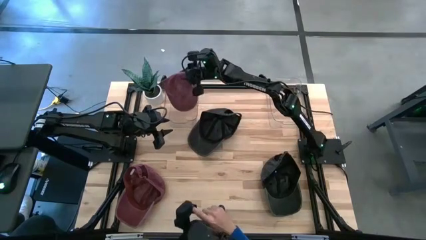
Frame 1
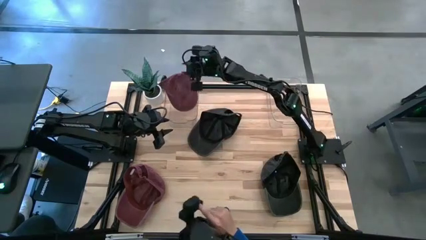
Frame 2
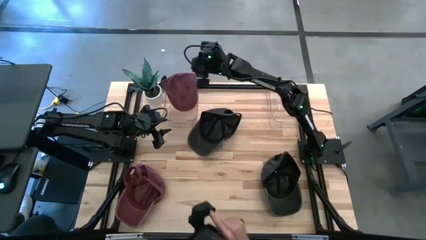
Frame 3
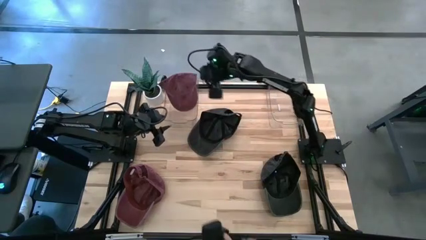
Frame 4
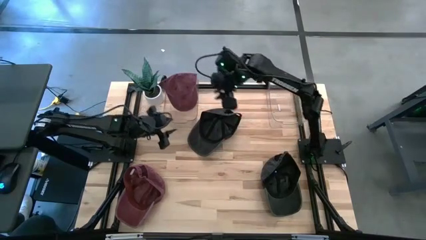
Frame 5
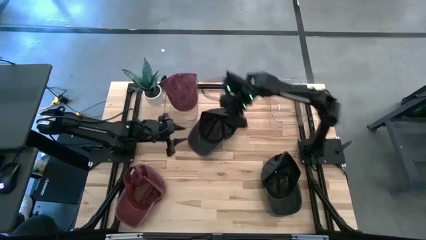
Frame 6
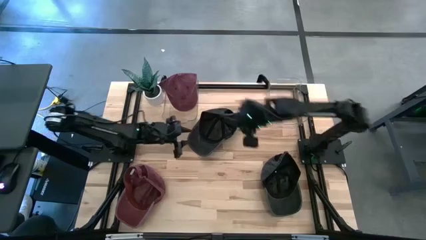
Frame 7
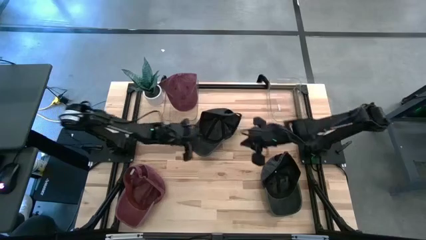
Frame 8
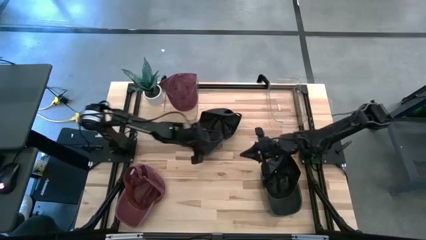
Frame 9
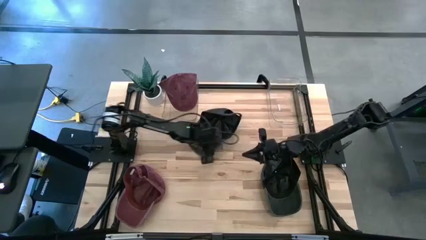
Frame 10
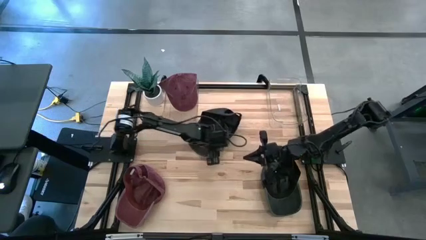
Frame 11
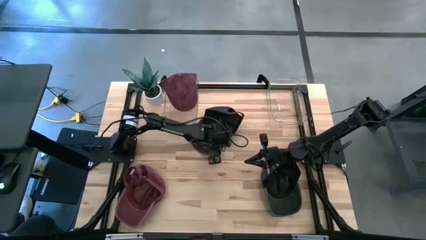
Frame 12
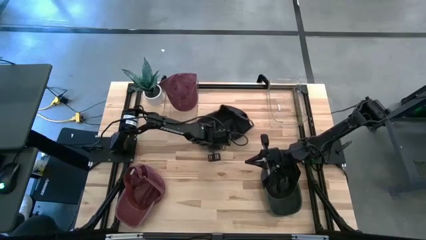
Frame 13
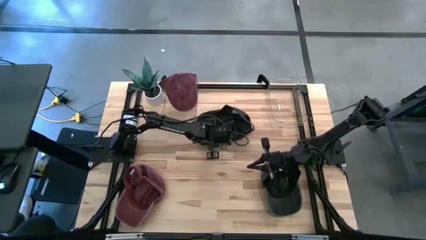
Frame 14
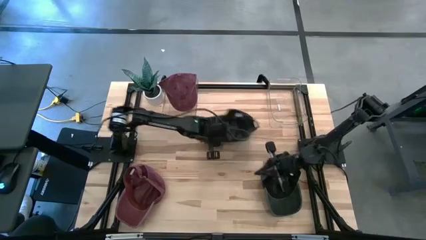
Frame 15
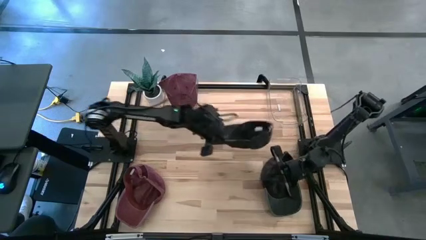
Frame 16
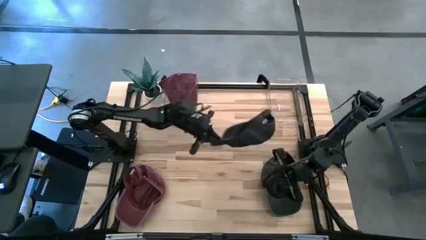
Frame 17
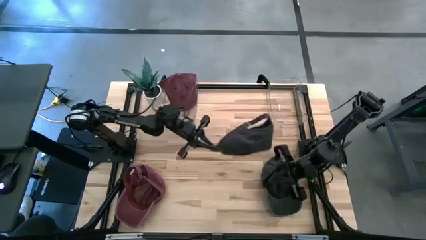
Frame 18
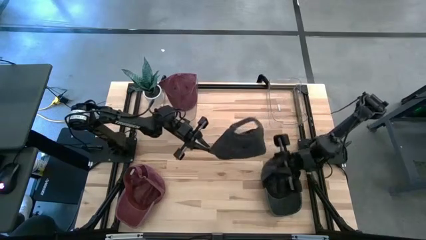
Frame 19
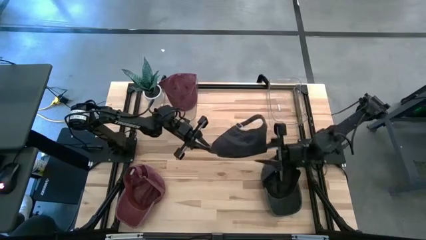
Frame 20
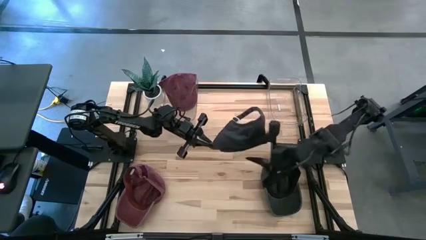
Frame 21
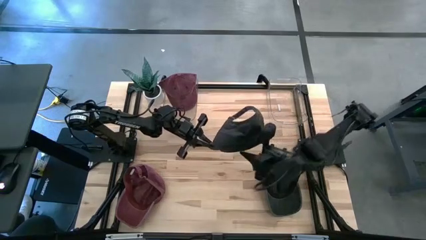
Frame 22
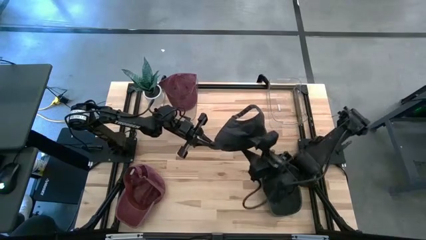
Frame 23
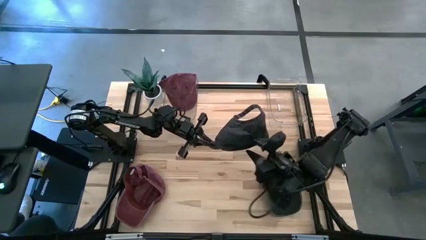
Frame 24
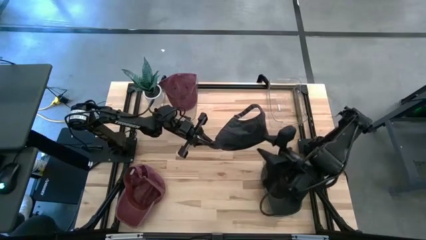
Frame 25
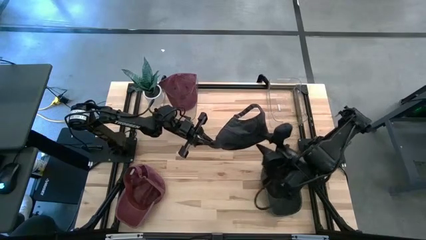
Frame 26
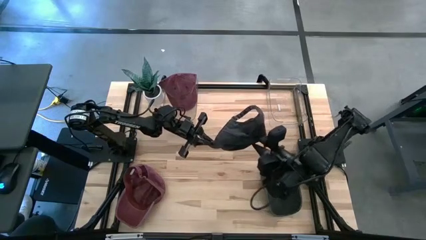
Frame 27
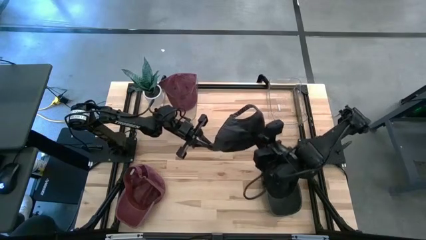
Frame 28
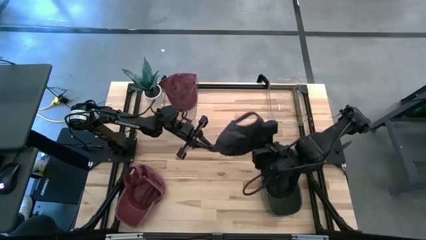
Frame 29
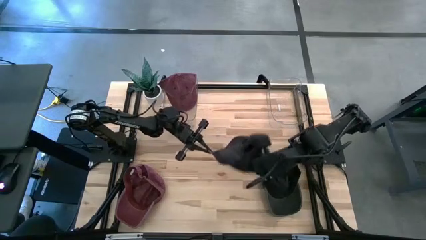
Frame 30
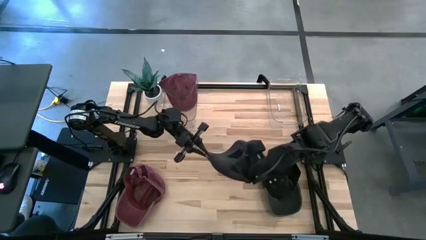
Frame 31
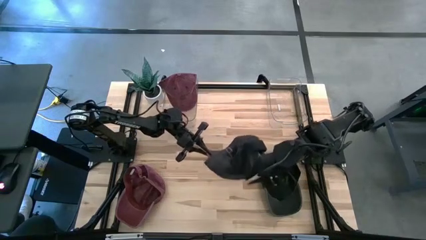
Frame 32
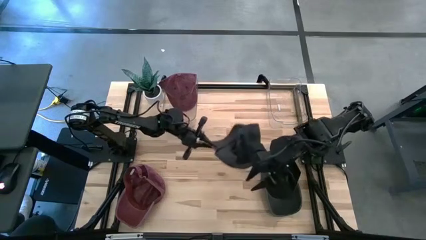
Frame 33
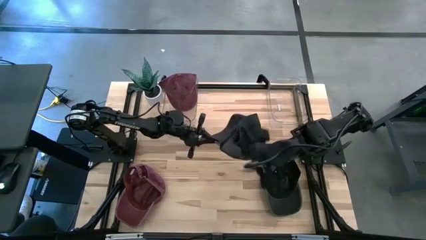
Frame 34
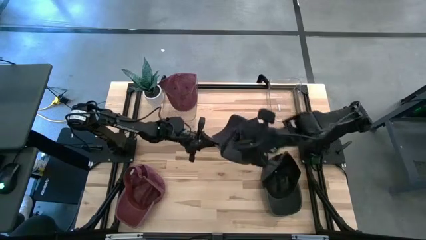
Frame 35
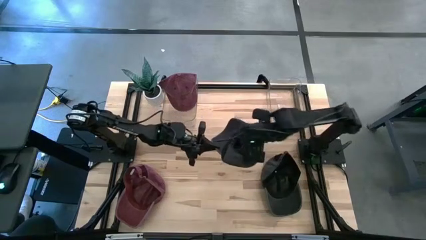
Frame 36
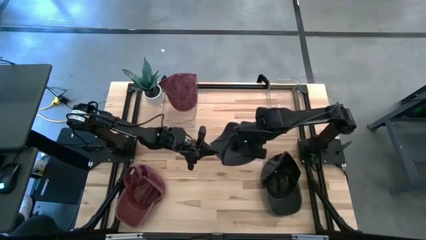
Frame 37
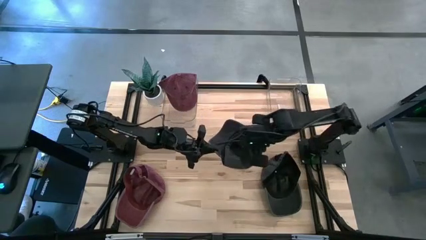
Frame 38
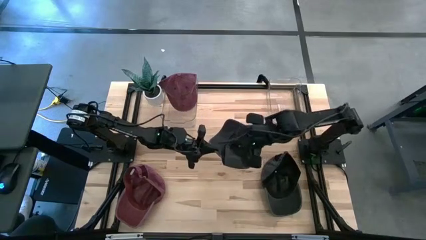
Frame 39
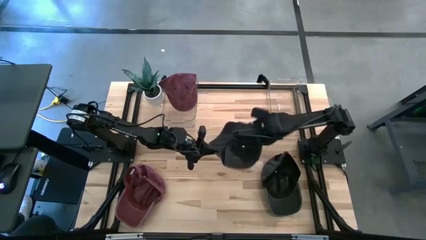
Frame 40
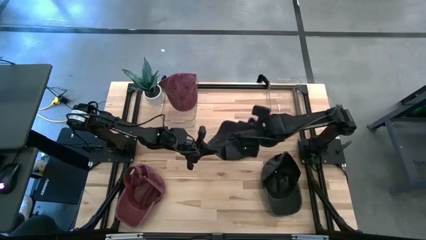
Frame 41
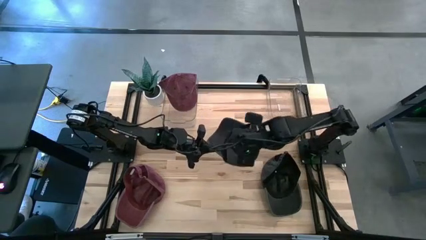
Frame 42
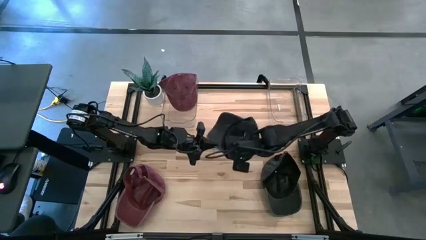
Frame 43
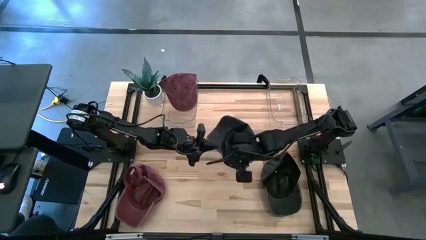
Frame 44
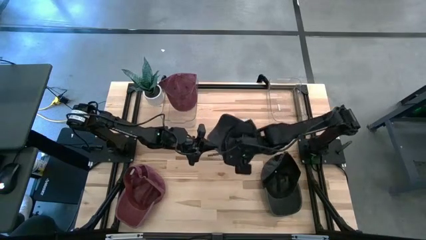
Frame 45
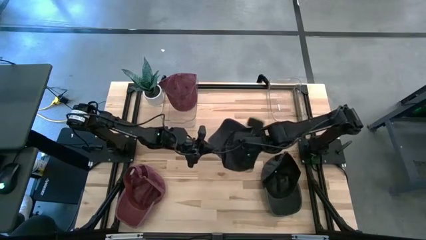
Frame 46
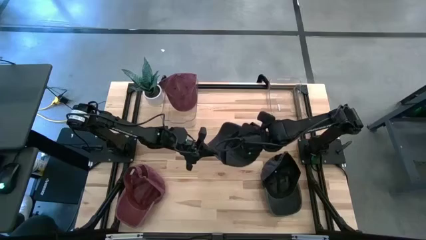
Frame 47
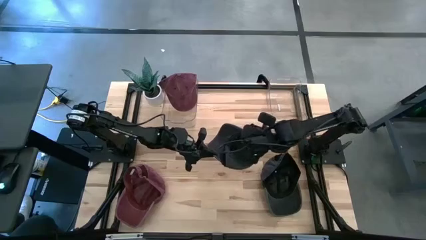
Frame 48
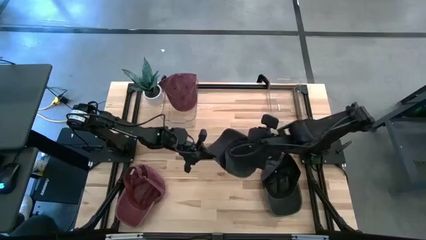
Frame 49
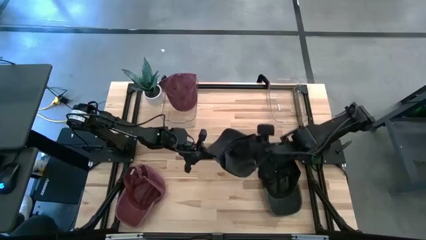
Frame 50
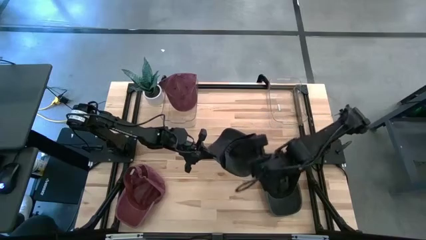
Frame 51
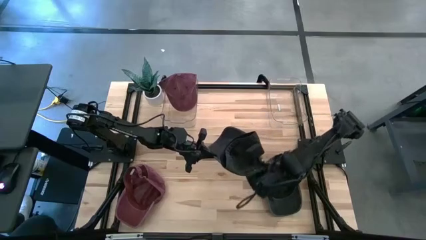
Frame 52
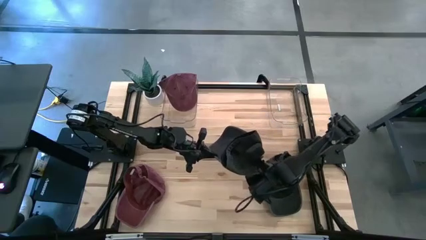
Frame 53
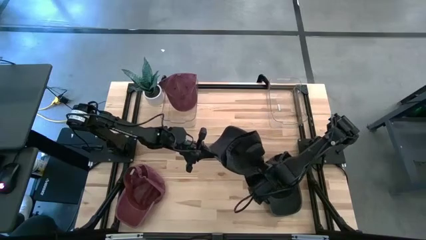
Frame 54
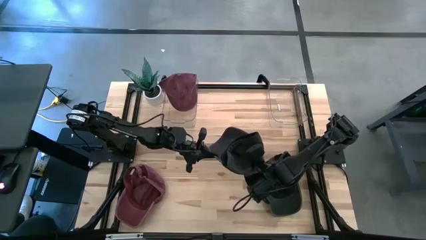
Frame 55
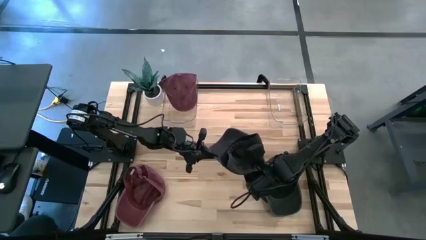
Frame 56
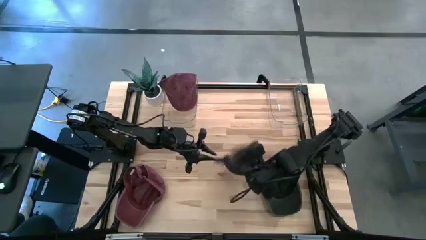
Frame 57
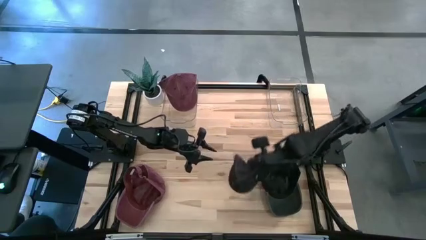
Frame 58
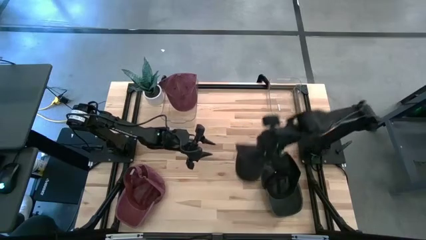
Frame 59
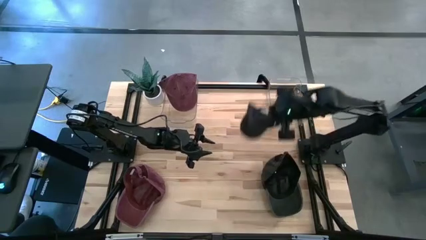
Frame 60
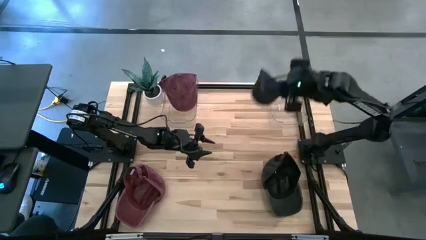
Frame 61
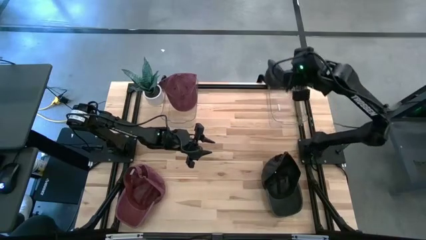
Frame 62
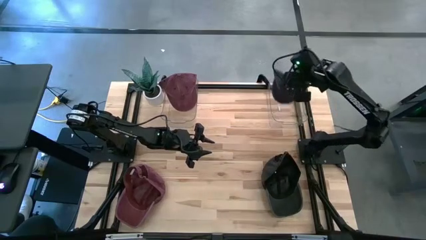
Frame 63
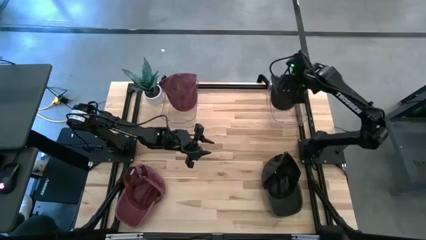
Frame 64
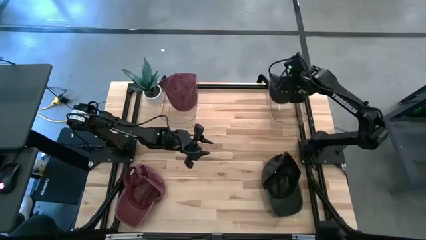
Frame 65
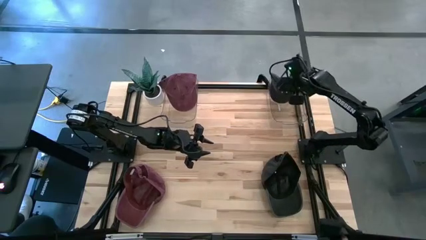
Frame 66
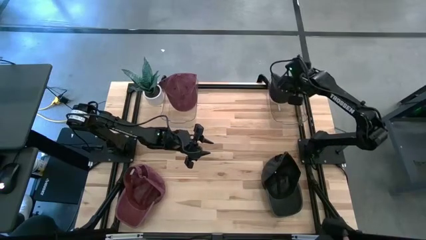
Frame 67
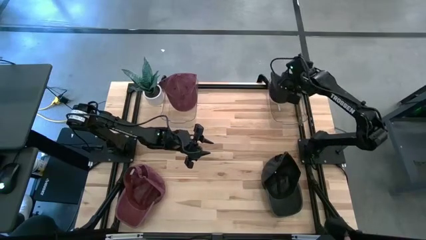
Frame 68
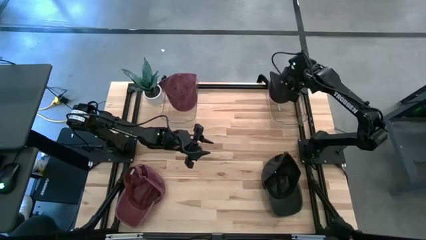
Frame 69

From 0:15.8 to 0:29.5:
Task: Pick & Place hat
Put the top black cap into the right transparent bin
